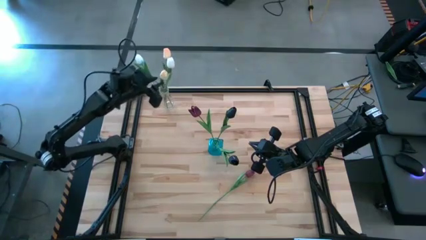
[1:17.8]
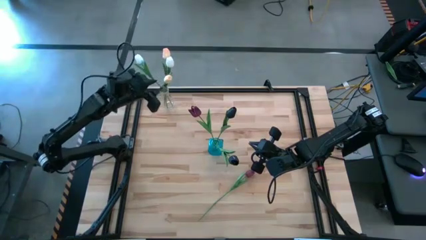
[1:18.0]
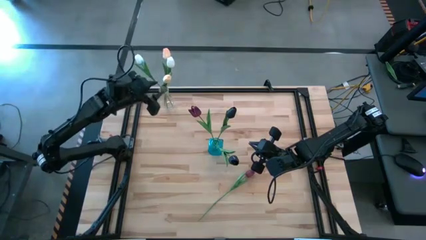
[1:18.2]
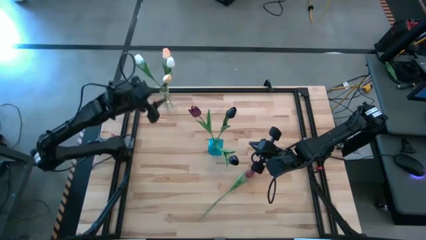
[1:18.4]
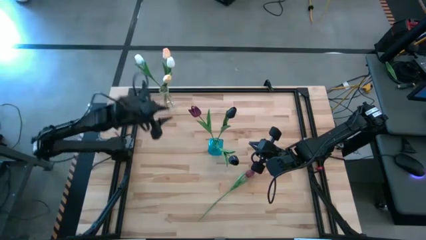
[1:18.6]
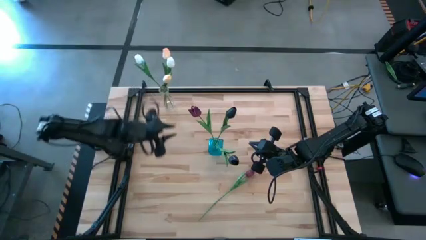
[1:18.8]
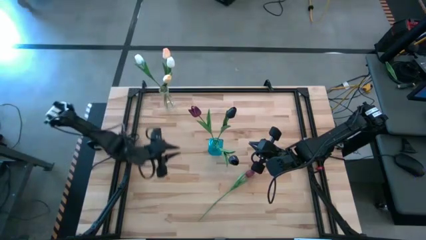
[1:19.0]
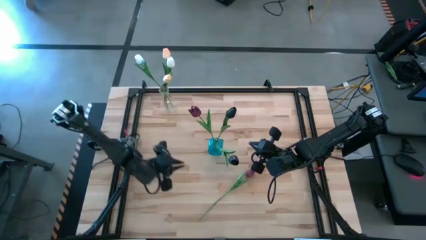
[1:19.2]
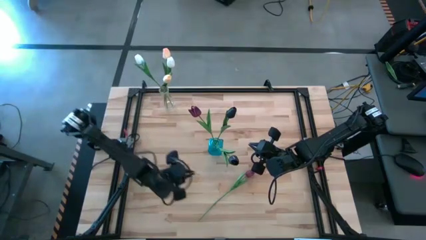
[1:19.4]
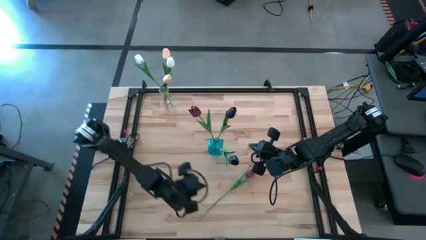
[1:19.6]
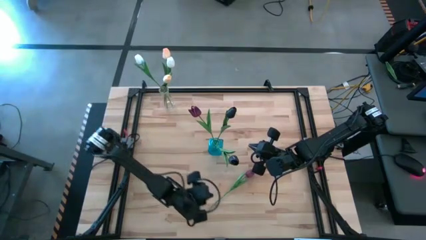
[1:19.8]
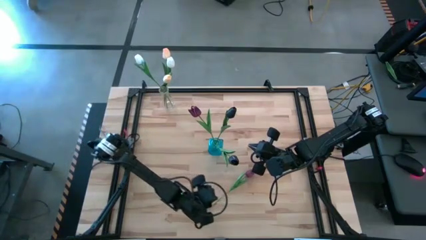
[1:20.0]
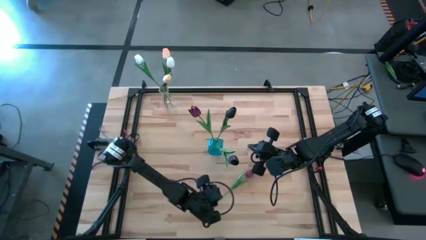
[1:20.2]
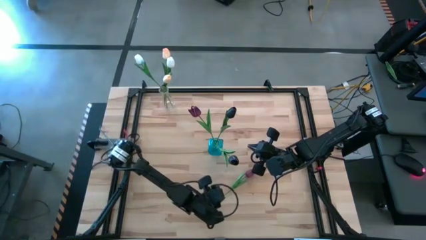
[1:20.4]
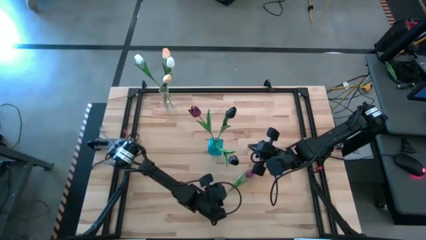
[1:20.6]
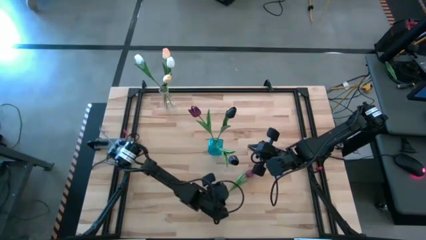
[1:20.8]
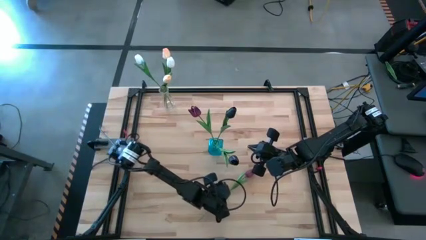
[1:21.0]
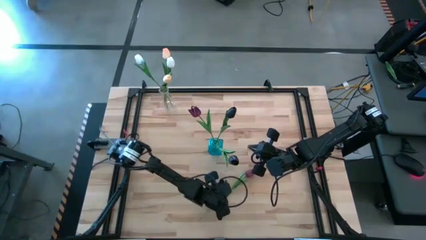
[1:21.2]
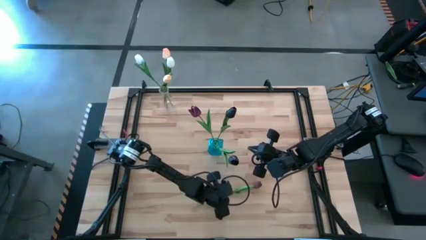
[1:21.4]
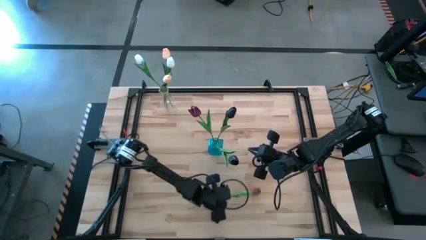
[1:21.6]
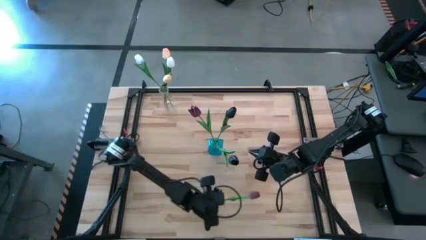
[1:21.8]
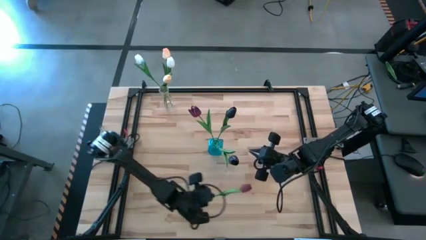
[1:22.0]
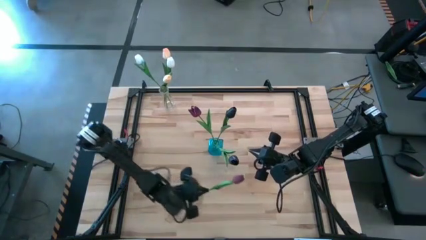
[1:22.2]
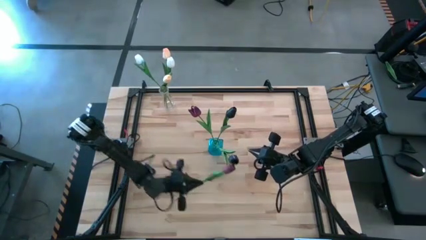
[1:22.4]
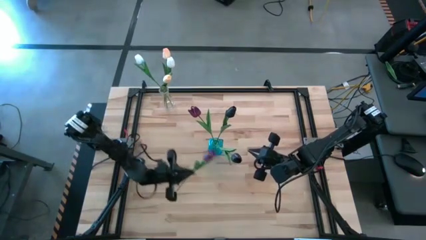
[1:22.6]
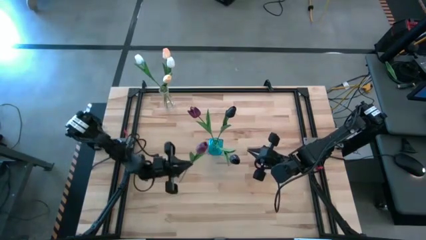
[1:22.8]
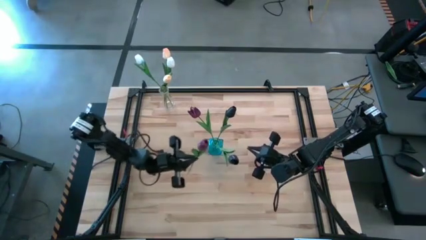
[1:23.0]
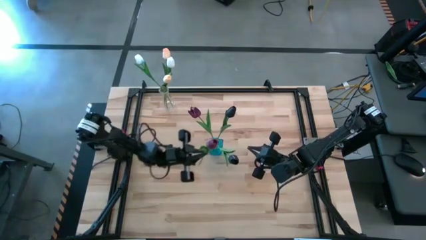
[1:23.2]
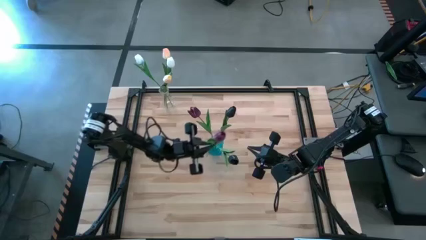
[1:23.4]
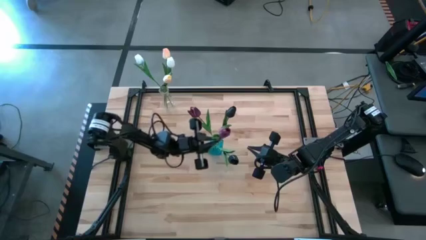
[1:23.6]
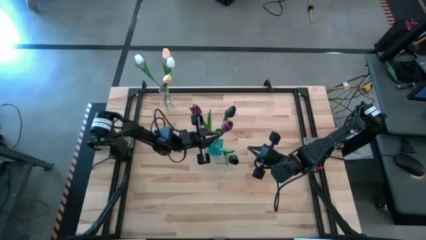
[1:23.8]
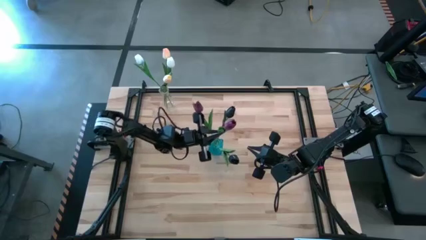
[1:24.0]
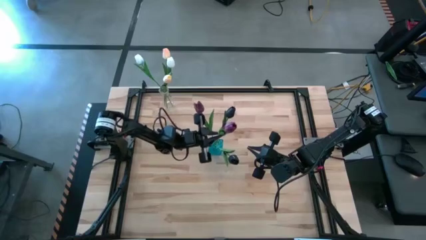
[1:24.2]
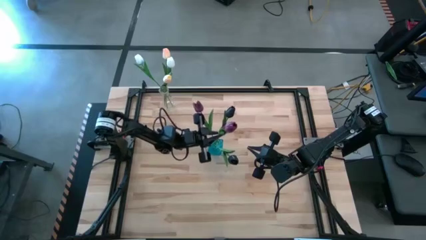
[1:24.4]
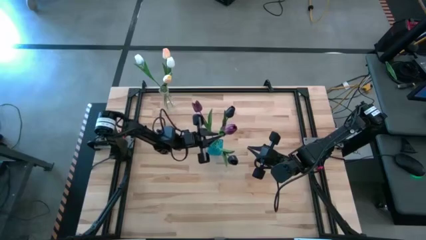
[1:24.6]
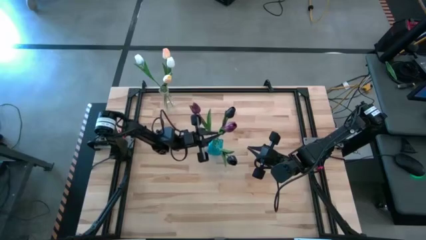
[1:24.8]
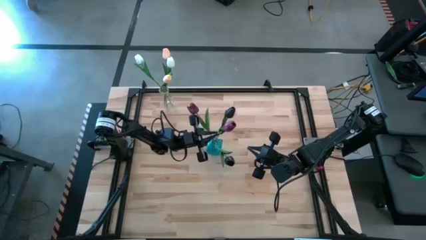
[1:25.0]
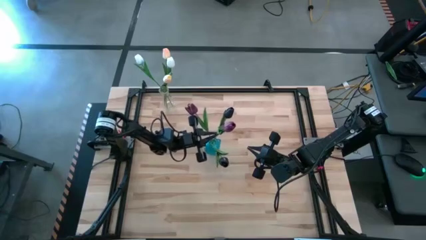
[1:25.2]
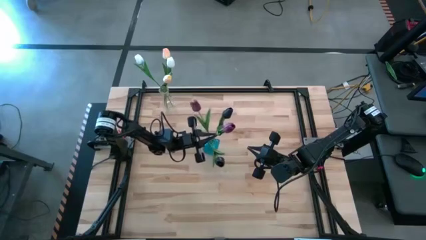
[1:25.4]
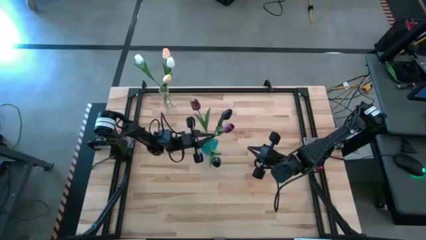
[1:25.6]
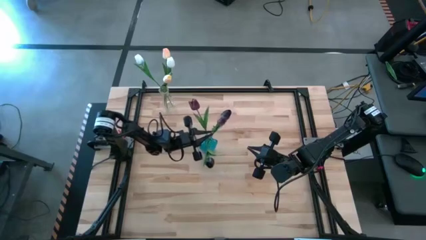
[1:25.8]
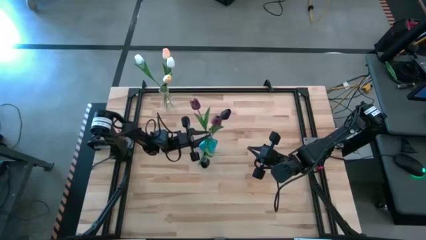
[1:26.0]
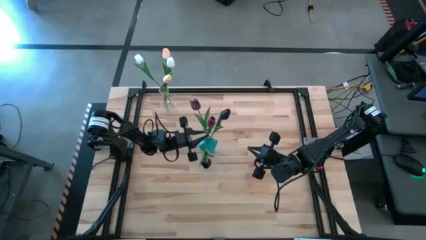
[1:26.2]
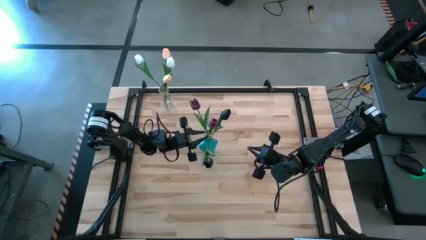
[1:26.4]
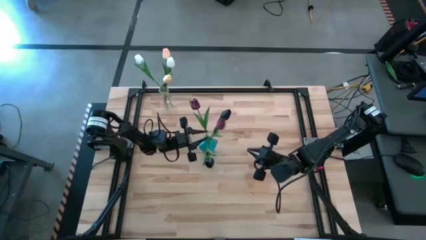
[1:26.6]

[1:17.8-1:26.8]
Task: Sort flowers into vase by color
Put the dark red flower into the blue vase

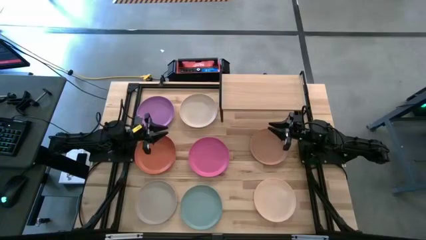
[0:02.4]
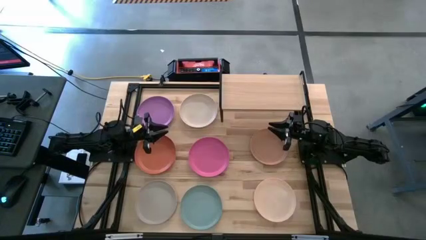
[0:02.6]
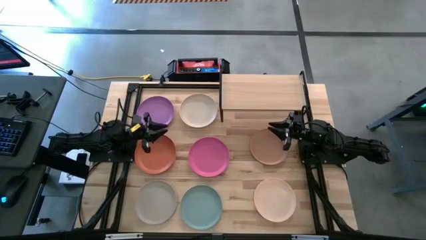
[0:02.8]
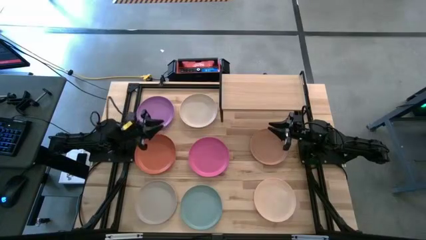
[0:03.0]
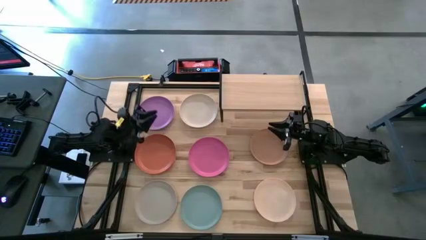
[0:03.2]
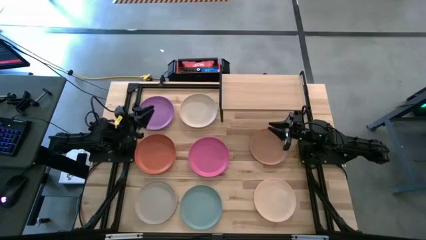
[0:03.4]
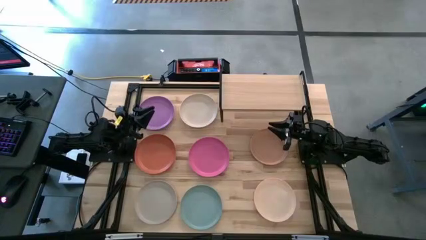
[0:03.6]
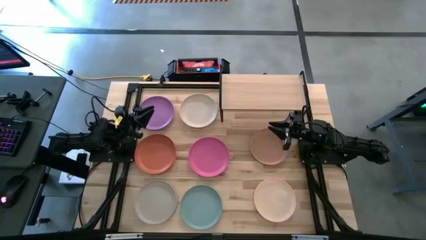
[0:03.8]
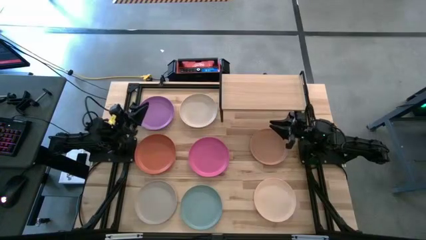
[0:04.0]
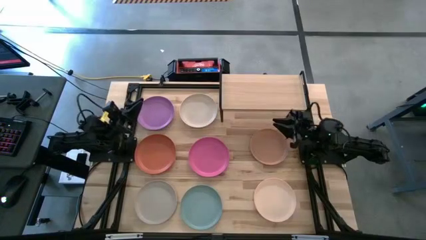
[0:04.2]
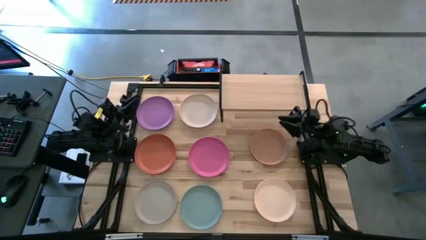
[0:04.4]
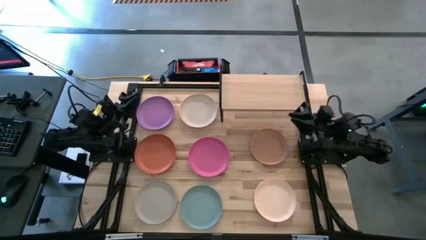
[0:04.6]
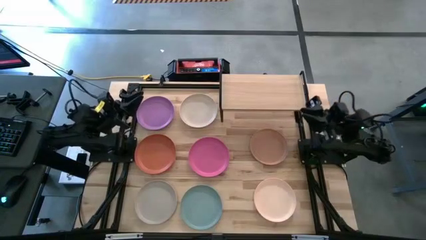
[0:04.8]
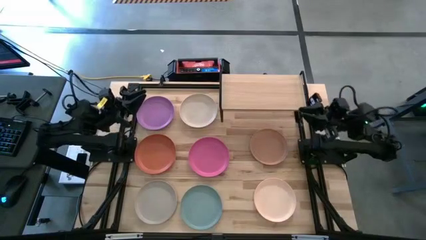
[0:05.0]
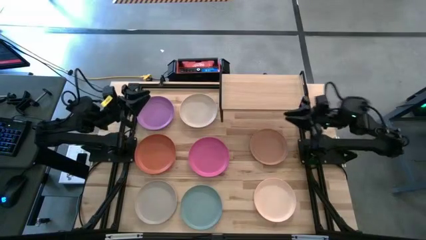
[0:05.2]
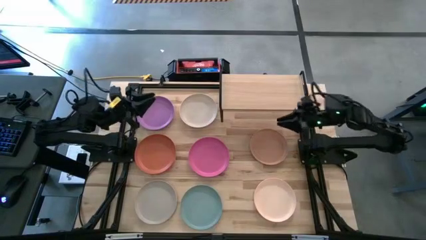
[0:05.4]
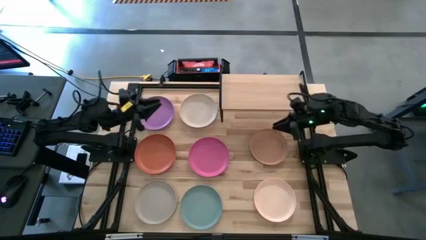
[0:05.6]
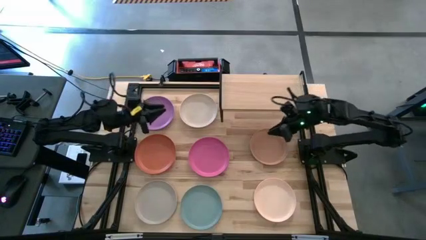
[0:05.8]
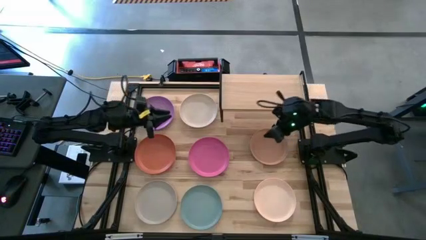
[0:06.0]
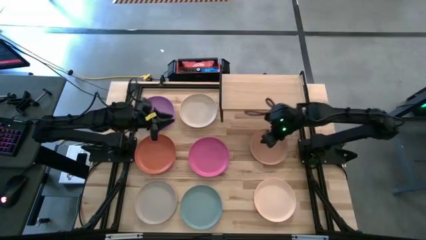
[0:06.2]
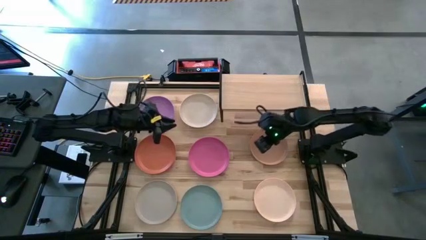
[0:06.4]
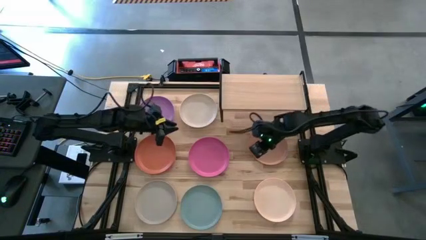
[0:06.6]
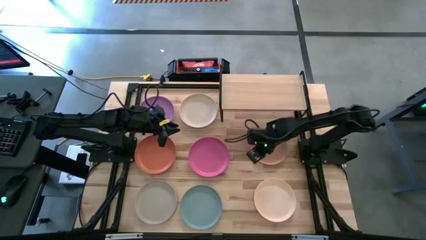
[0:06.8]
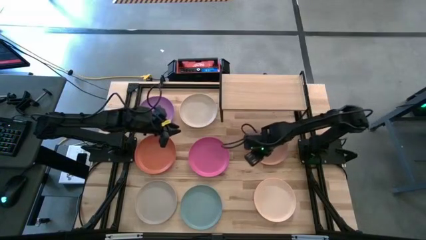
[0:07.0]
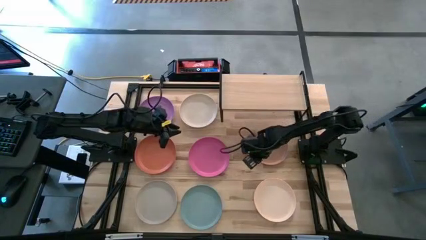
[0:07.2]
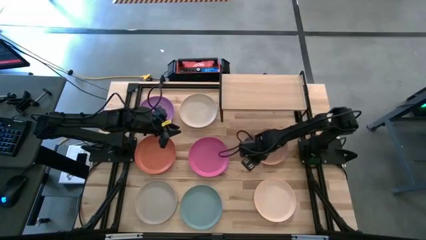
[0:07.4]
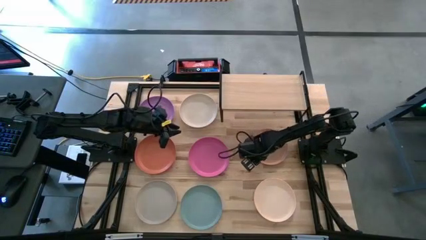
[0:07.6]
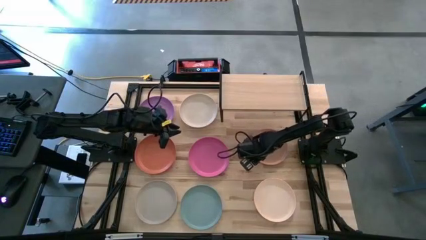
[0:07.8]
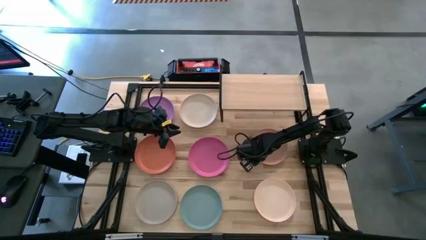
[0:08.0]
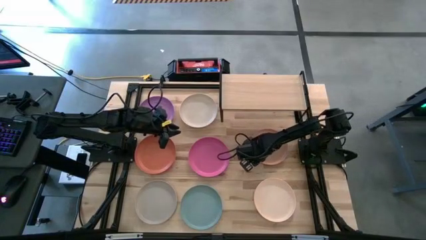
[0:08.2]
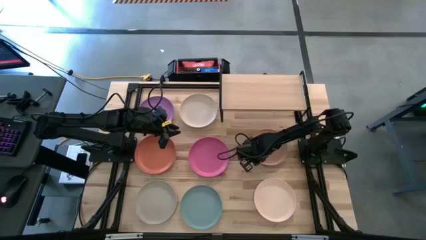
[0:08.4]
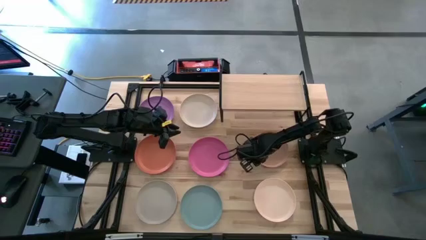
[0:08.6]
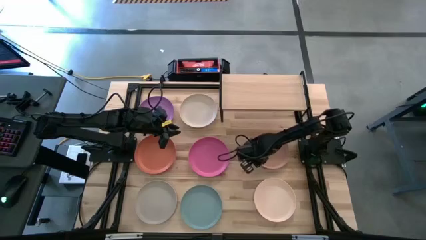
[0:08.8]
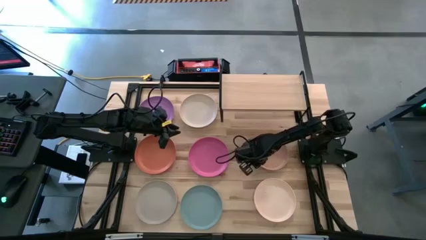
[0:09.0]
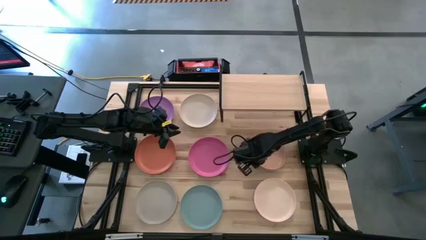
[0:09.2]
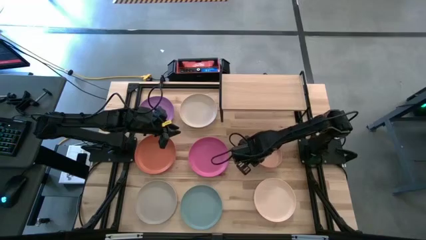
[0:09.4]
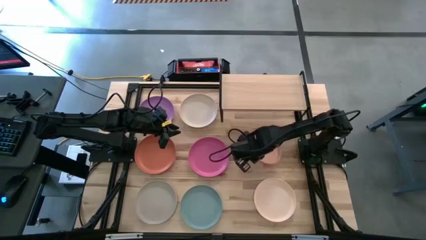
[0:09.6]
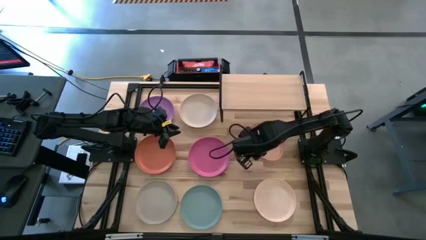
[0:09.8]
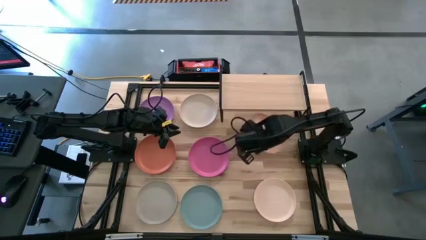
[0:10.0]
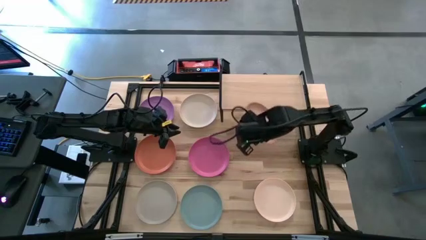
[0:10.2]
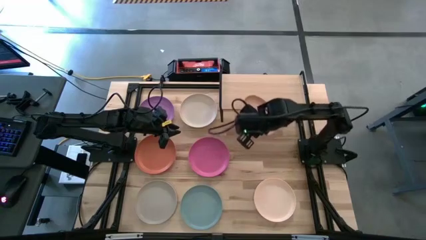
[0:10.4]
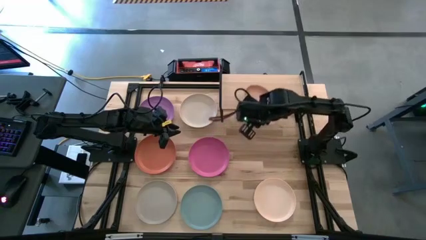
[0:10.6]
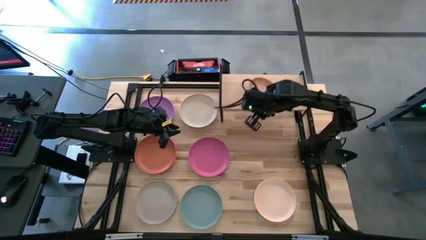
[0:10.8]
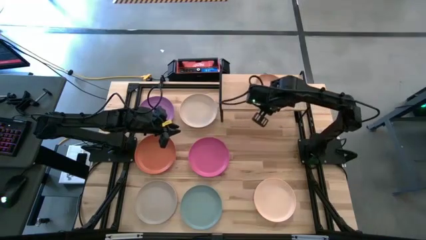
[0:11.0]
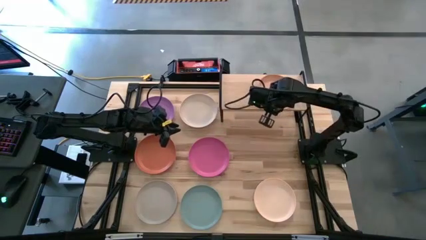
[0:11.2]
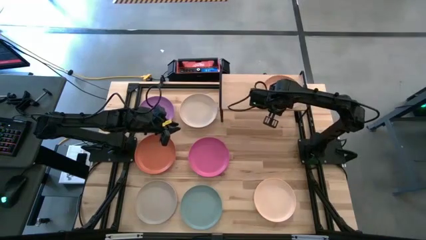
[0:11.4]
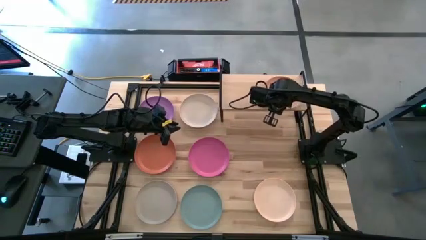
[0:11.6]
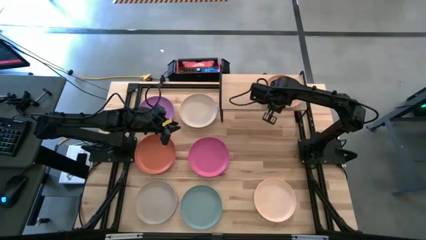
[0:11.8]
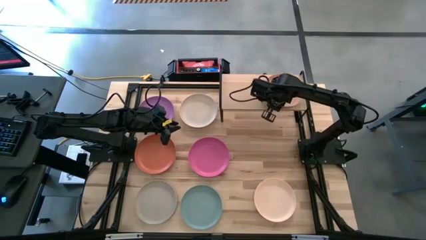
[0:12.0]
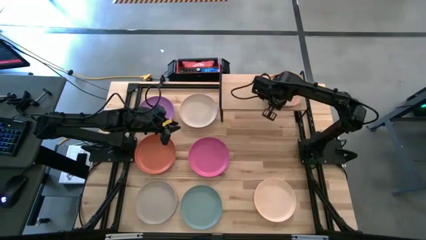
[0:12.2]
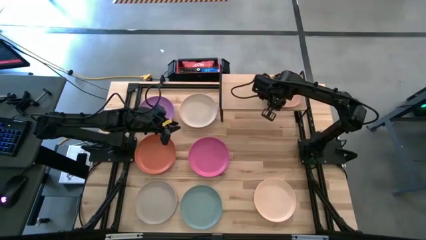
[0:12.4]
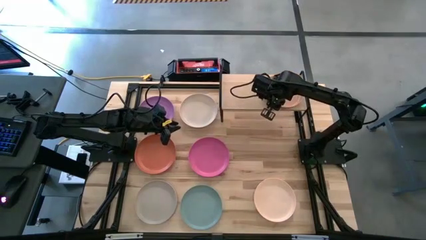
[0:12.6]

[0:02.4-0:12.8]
Task: Place and stack plates onto a shelf
Put the light orange plate on the shelf
